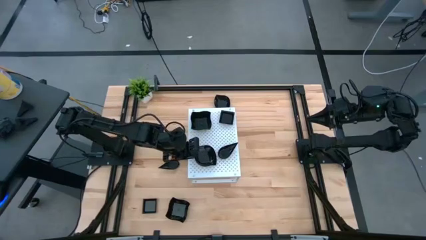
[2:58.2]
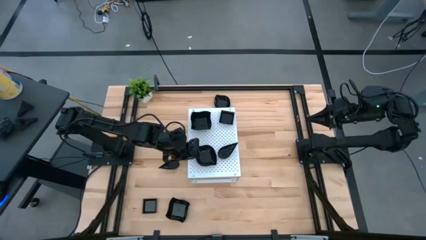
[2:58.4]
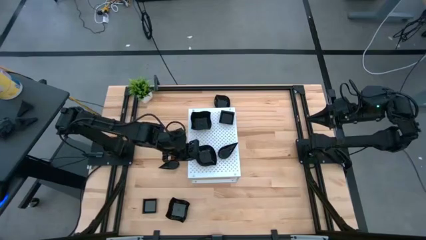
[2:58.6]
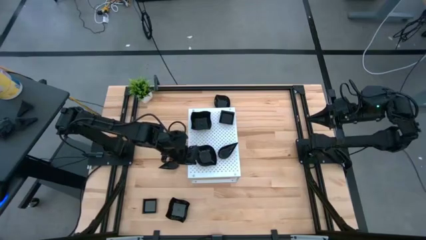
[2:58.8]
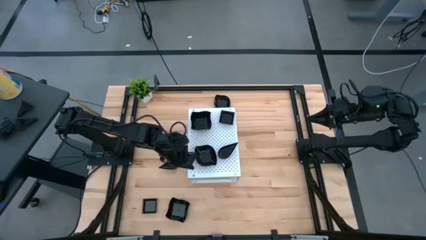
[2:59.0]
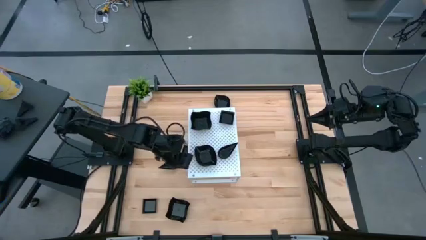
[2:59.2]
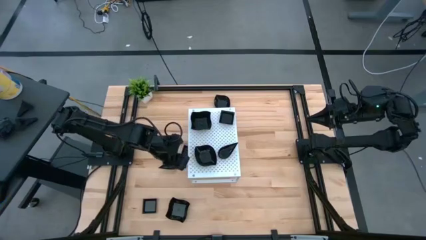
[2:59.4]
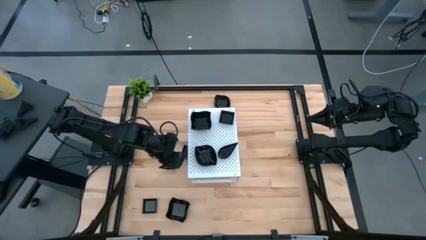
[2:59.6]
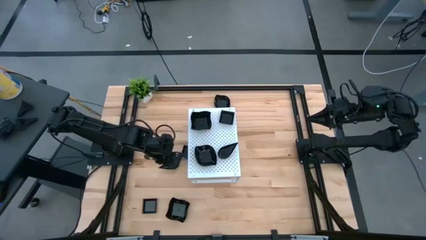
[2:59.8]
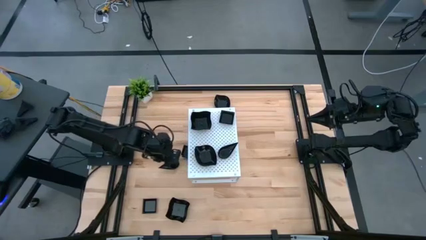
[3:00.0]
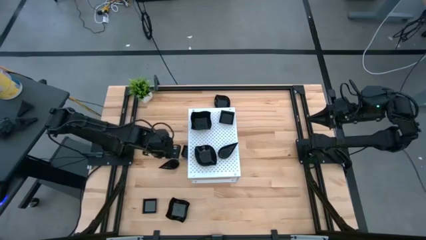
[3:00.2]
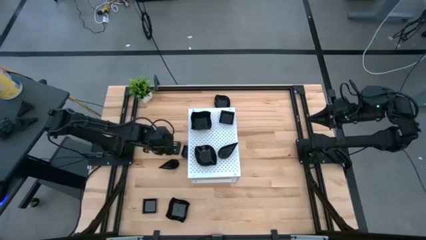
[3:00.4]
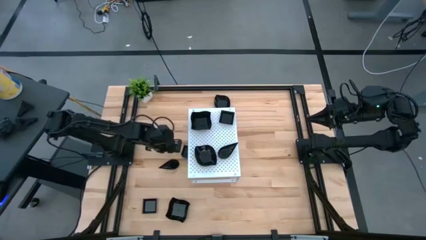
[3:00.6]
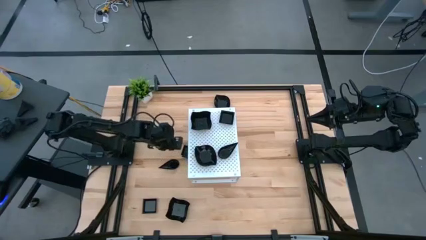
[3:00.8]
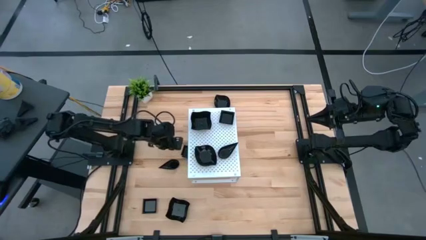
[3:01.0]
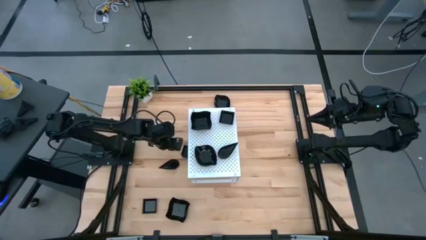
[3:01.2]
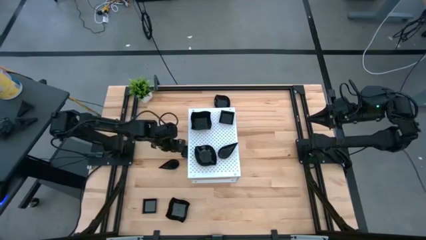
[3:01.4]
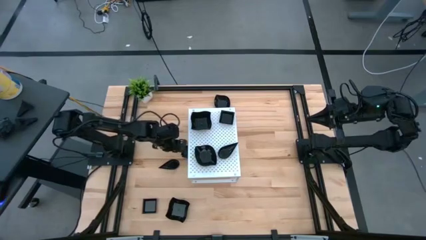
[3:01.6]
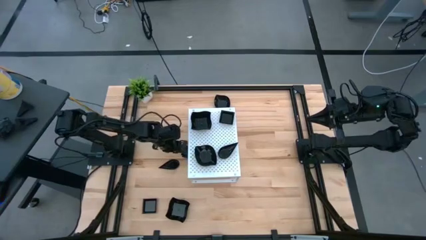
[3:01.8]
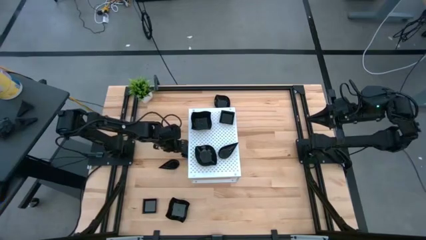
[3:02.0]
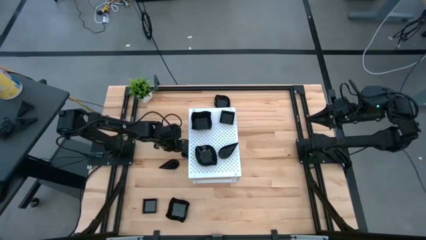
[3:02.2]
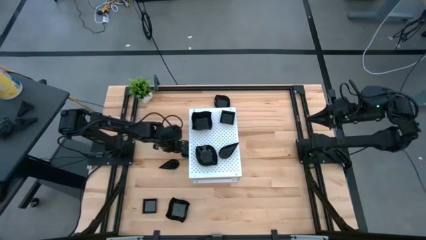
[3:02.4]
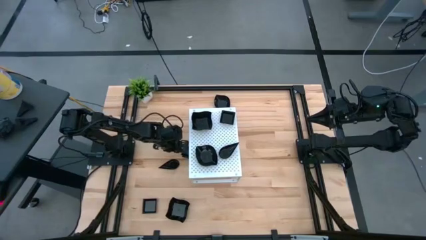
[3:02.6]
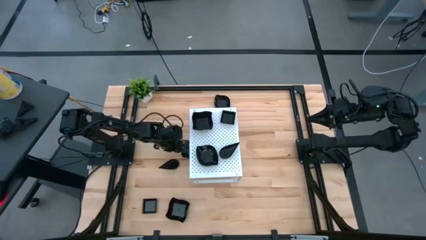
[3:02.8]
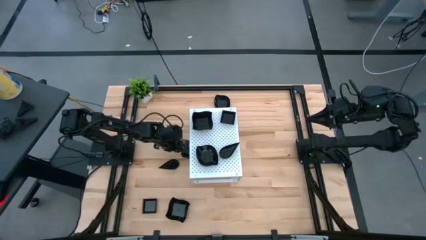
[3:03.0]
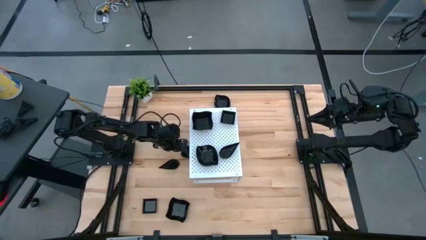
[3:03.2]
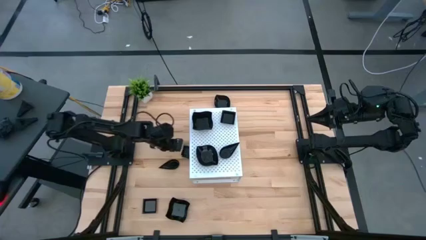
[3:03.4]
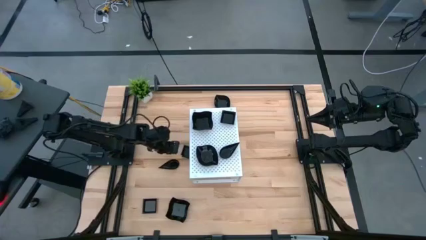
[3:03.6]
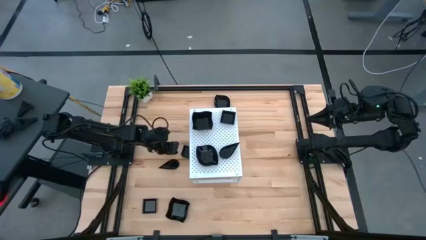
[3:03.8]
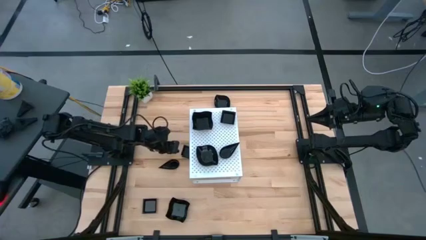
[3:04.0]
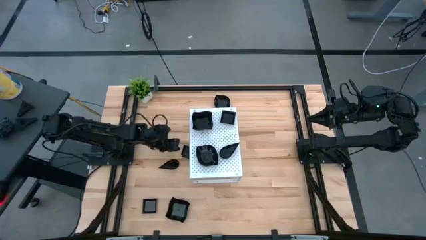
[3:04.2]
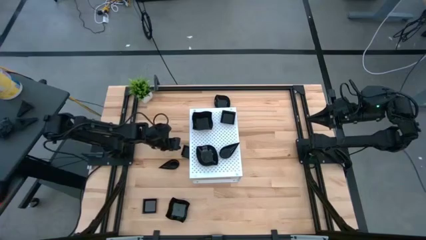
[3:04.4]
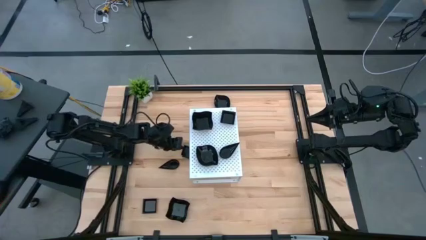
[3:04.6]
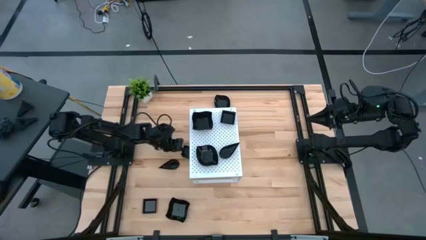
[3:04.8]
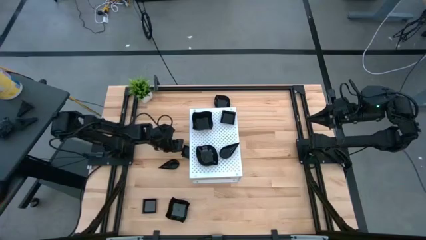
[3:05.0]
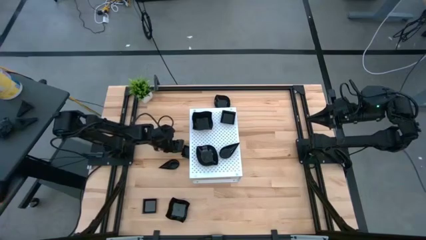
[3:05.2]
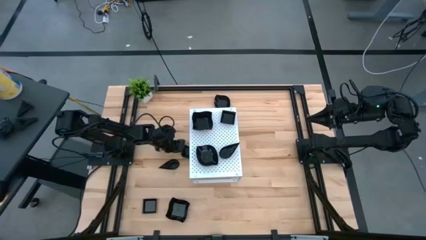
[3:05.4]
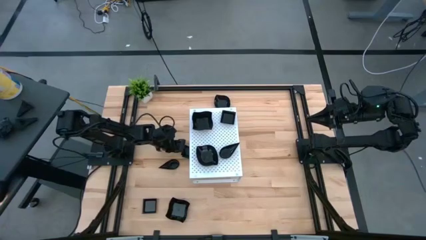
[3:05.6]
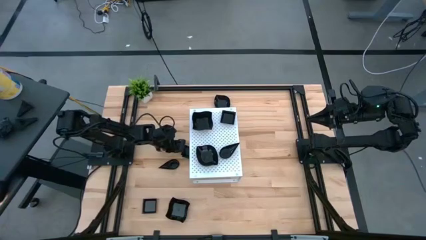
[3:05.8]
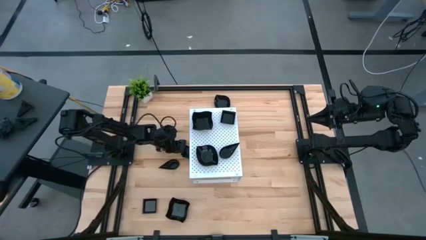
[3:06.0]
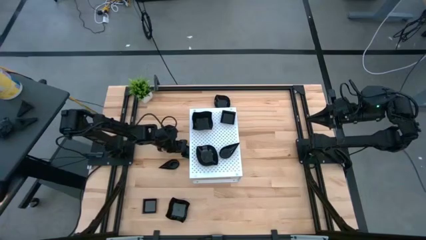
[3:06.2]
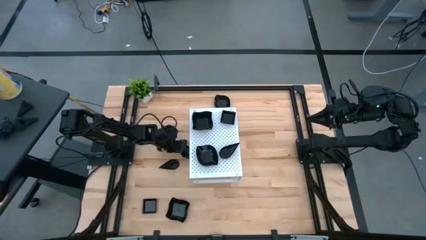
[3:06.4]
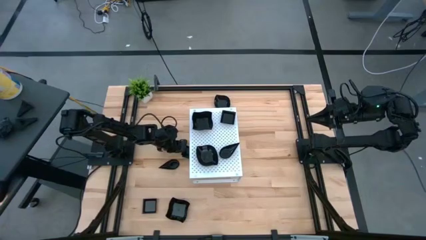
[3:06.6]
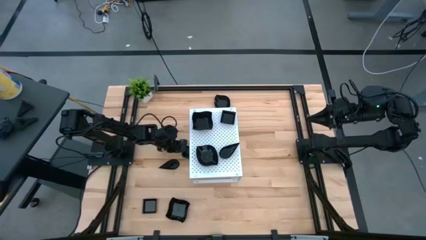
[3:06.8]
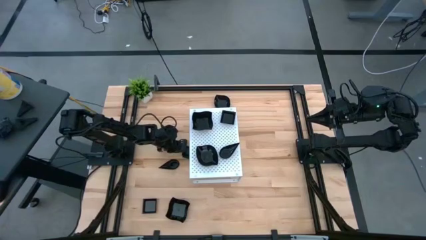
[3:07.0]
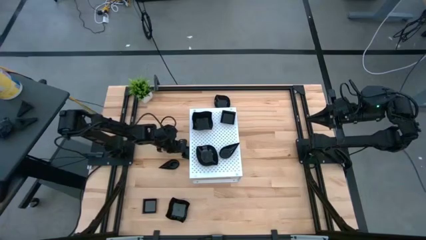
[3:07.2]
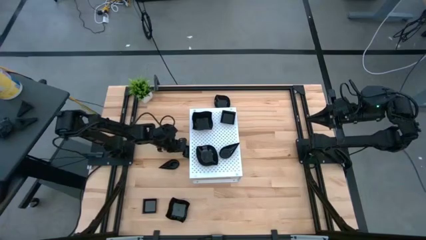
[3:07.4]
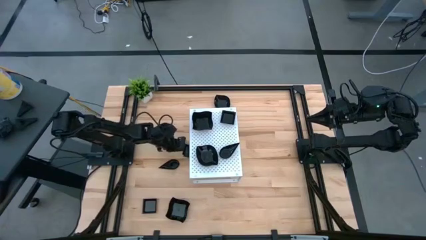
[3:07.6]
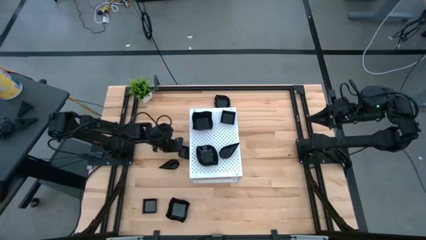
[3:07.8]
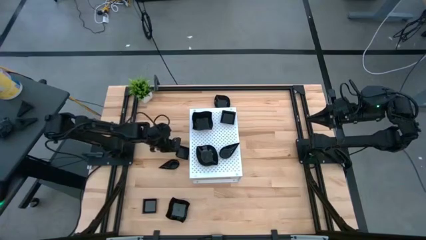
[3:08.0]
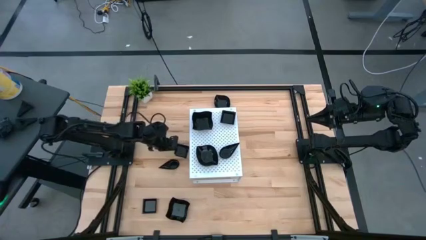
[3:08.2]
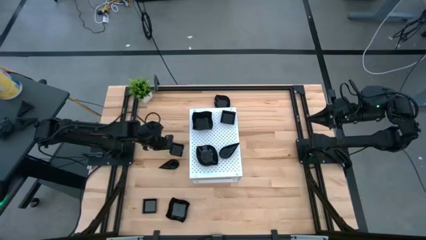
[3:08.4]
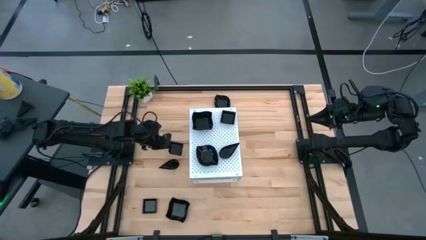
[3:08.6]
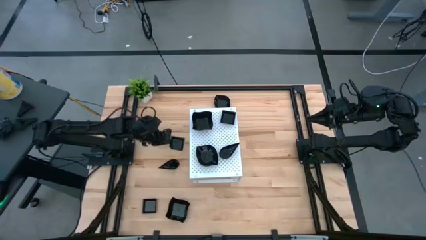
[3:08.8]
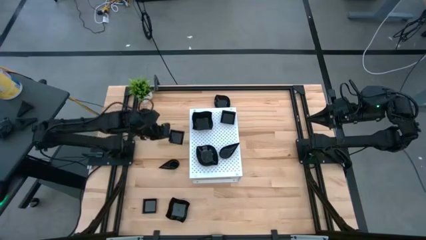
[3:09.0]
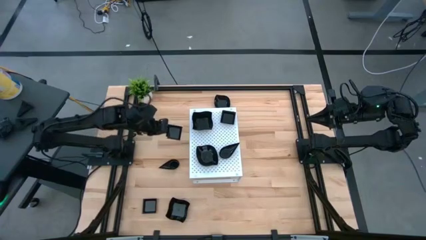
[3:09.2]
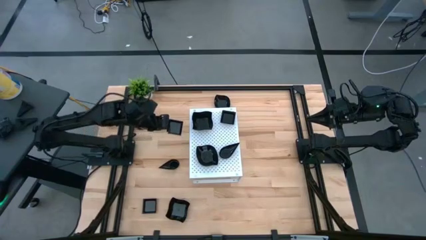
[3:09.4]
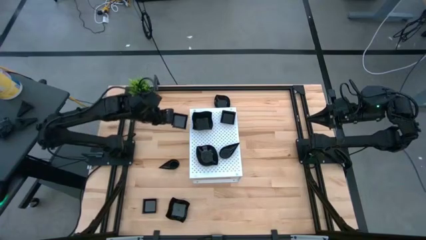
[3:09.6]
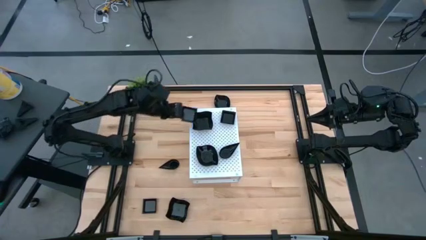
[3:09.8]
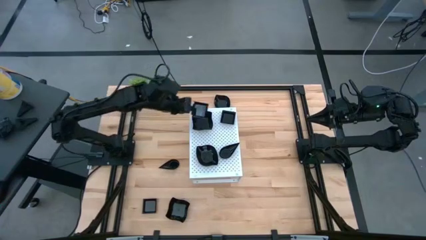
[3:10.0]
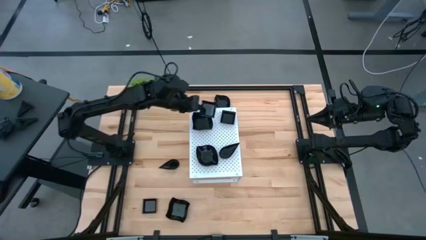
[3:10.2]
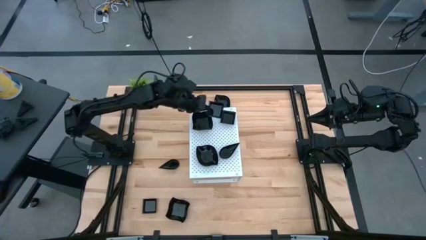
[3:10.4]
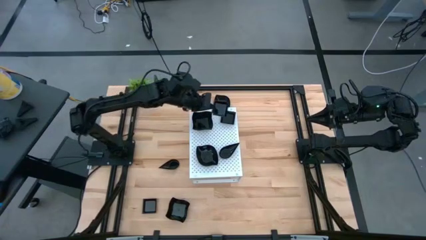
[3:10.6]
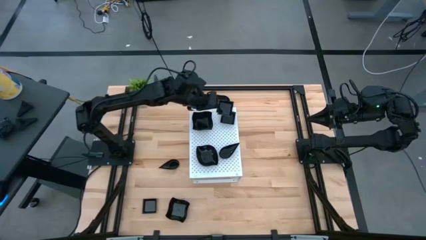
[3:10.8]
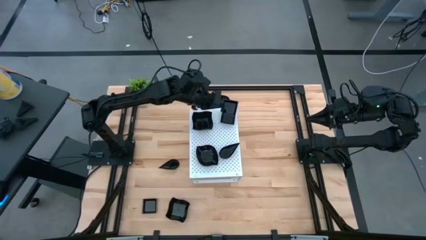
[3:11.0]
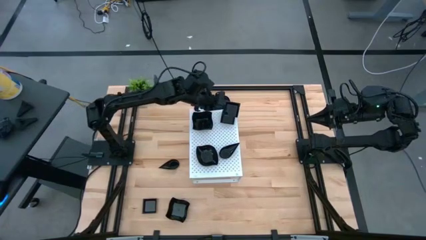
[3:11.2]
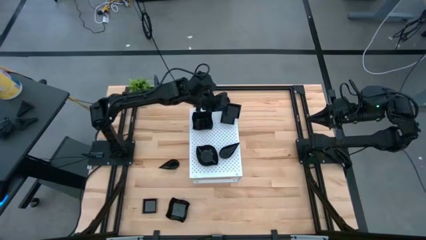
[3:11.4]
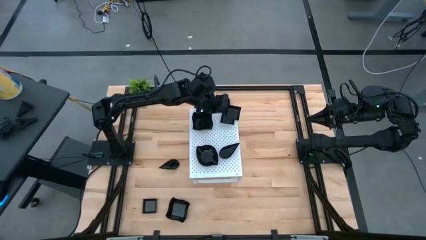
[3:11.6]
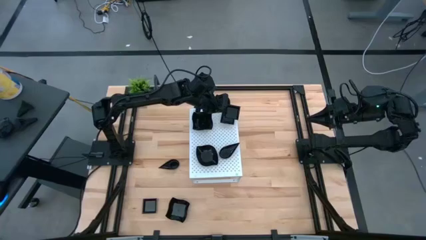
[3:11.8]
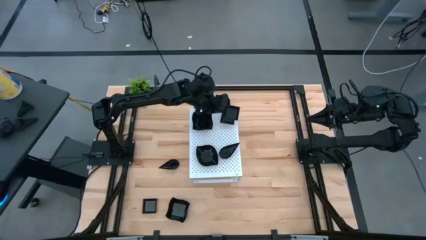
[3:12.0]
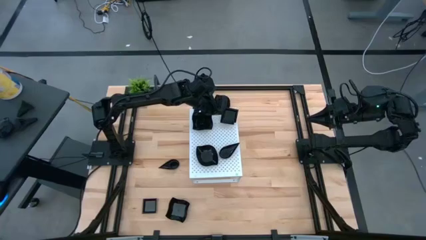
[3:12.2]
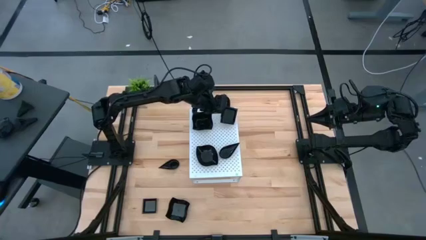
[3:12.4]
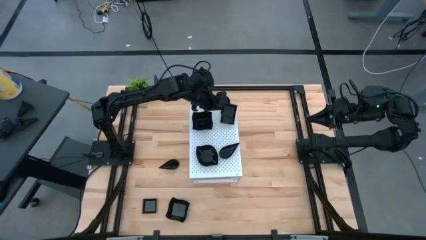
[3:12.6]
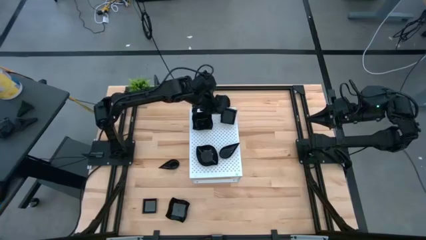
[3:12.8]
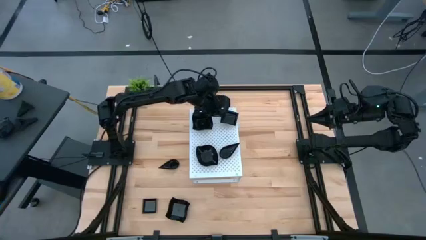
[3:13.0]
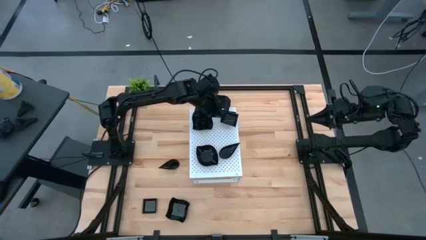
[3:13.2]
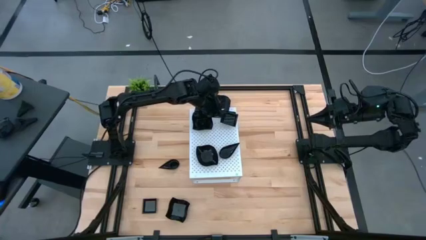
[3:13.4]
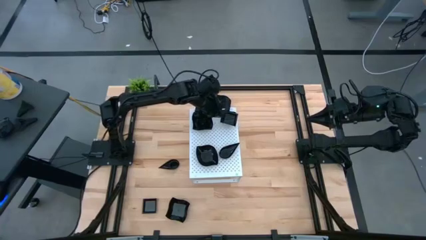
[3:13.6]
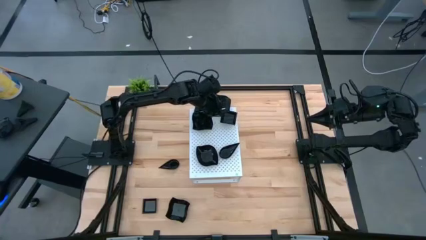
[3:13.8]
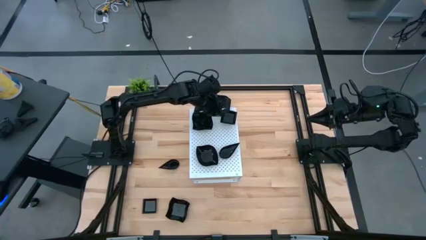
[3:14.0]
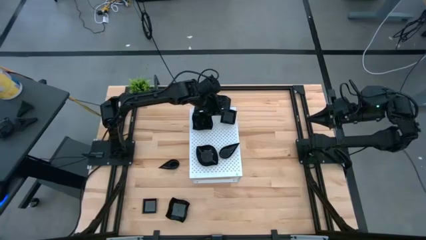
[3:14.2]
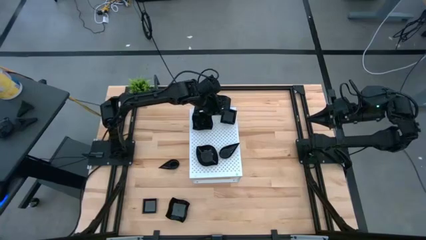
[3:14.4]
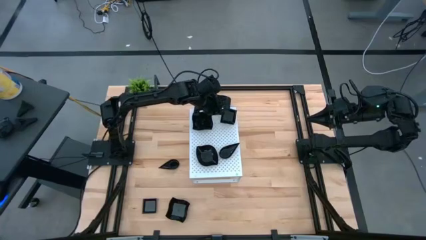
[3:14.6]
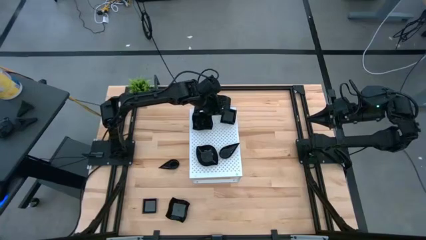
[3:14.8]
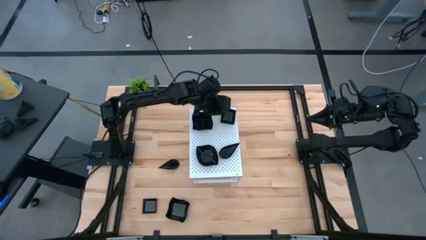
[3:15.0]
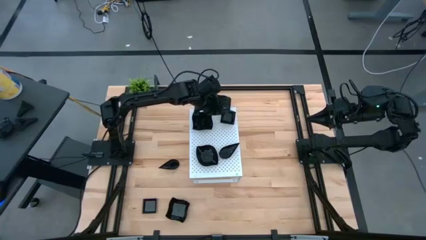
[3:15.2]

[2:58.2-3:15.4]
Task: Pick & Place Mini shaped plates
Stack the black square plate on top of the other black square plate on the shelf
